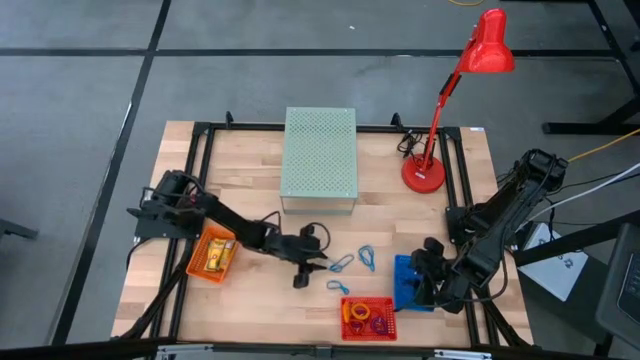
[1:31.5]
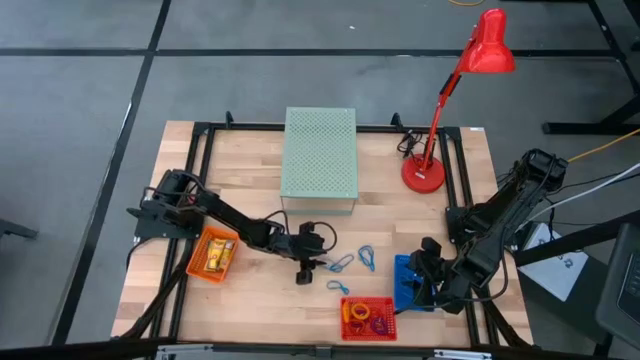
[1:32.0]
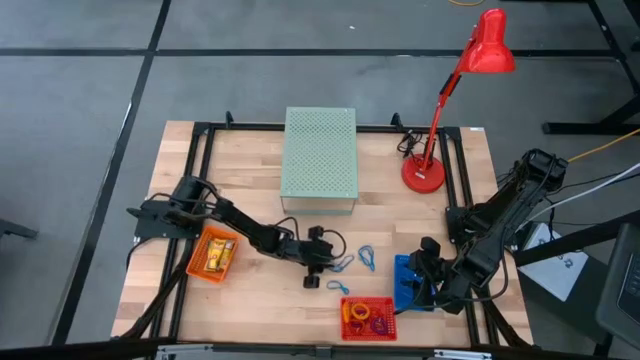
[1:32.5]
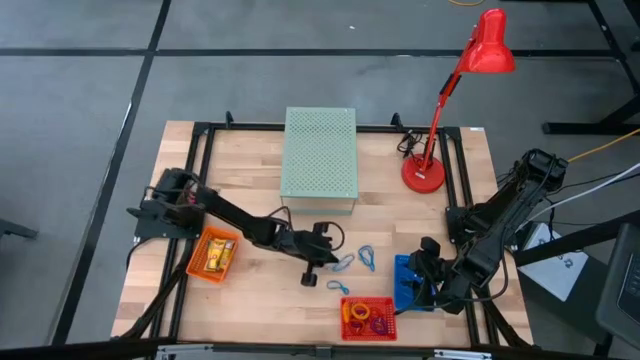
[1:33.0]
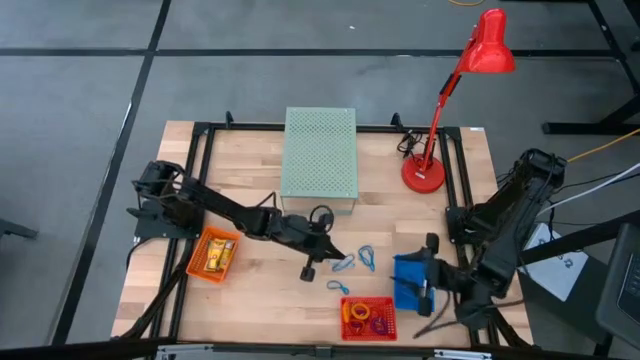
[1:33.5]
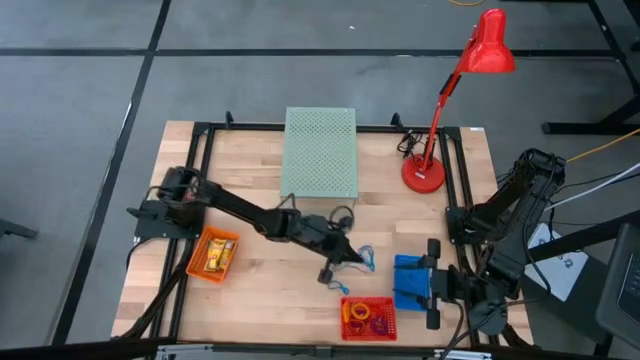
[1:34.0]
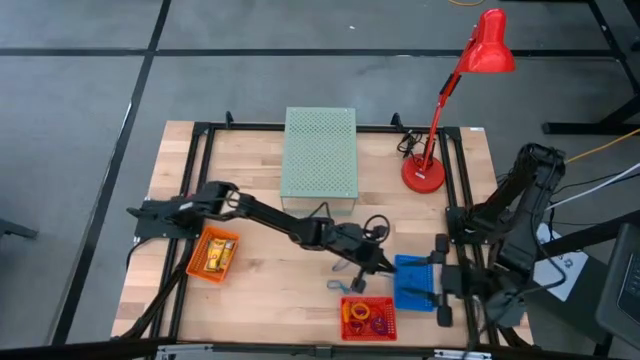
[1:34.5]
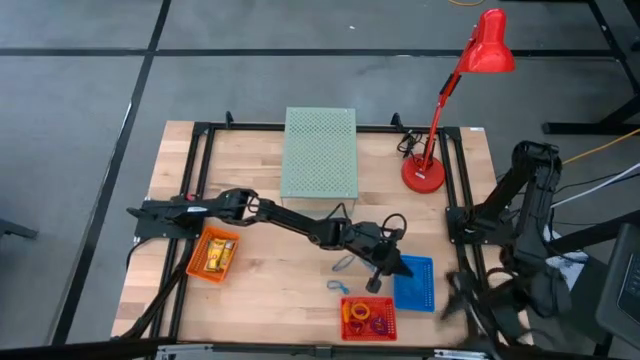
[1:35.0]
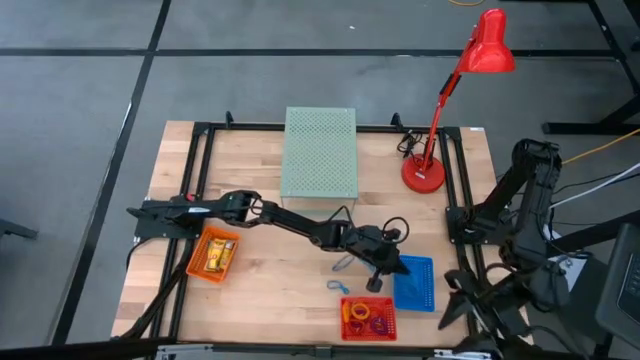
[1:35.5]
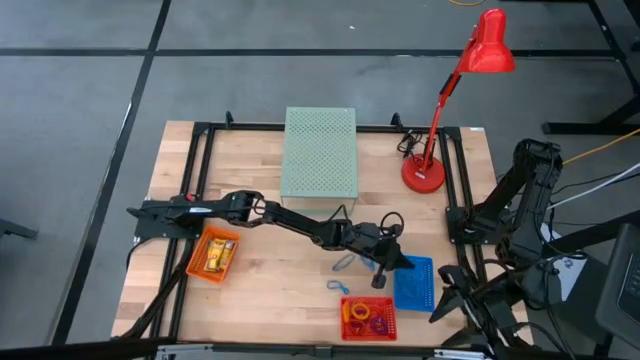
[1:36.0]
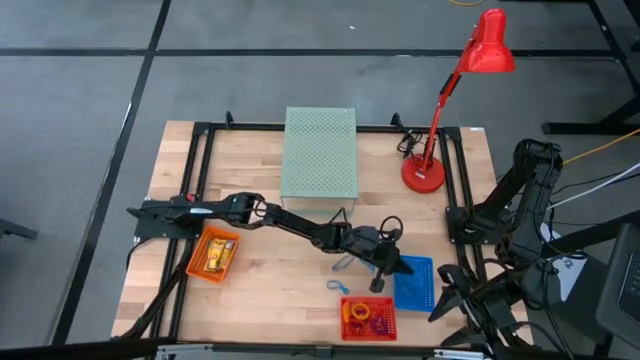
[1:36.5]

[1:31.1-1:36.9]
Task: Pick & Place Office Desk Supplies
Put the blue rubber band into the blue bin

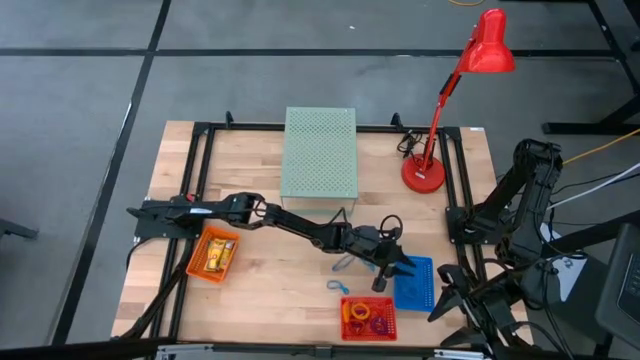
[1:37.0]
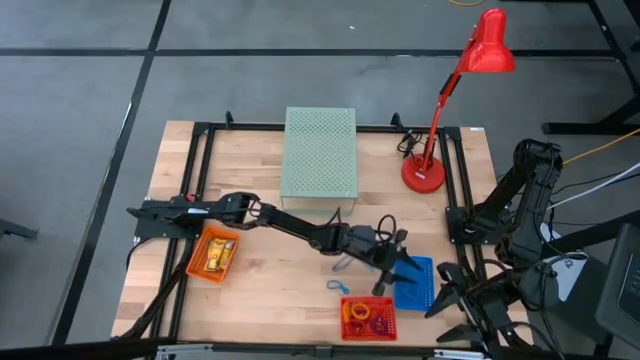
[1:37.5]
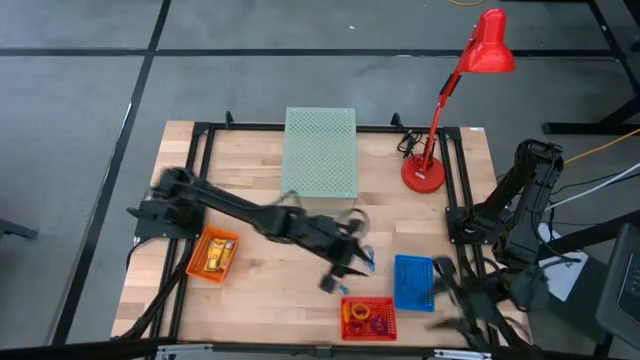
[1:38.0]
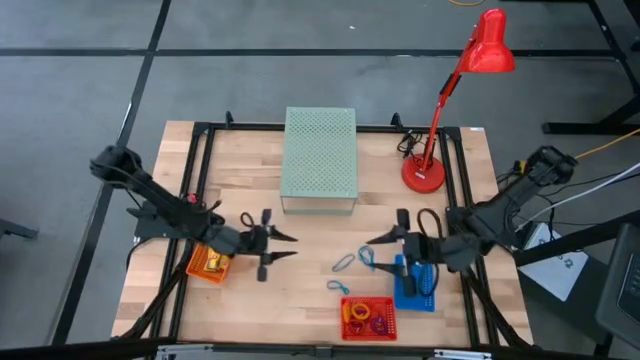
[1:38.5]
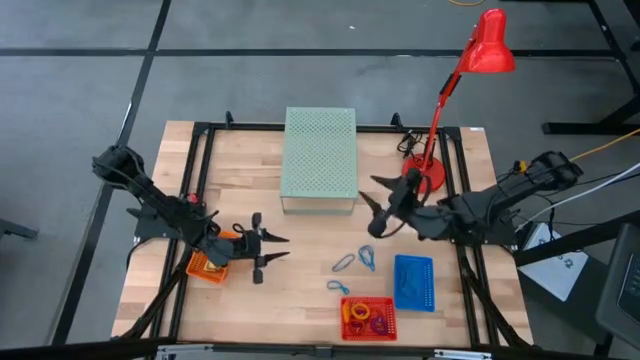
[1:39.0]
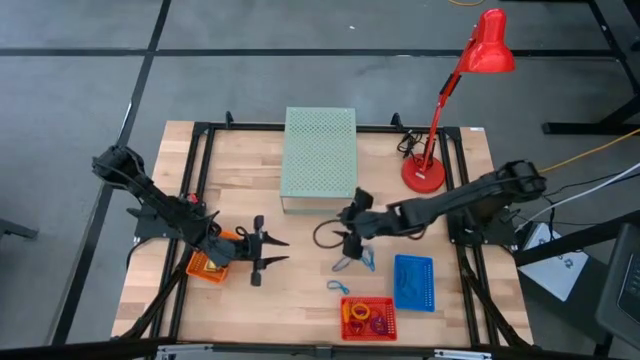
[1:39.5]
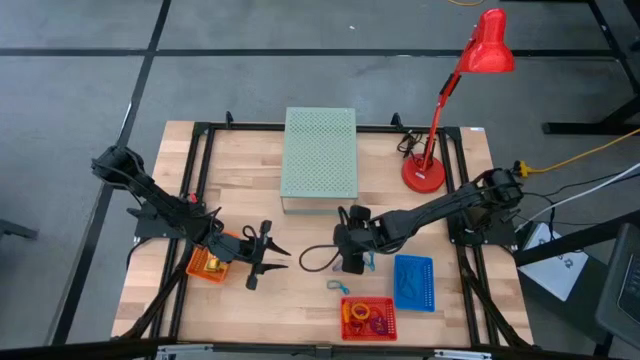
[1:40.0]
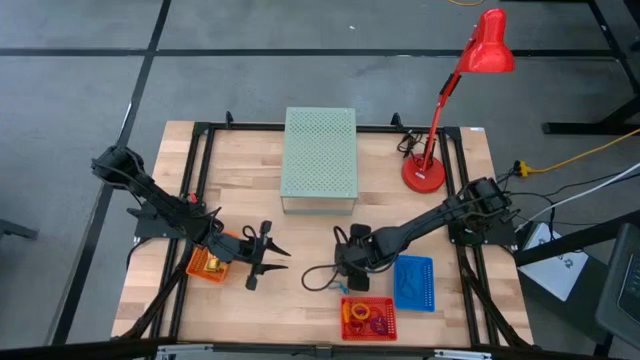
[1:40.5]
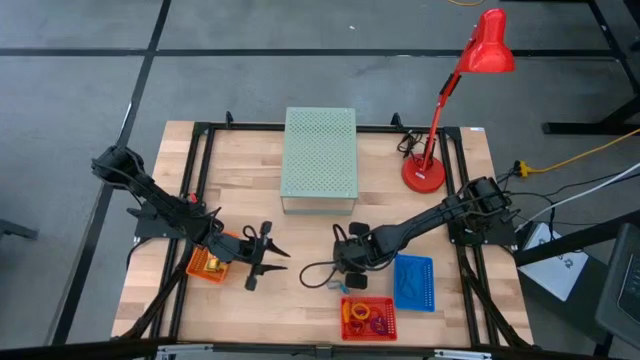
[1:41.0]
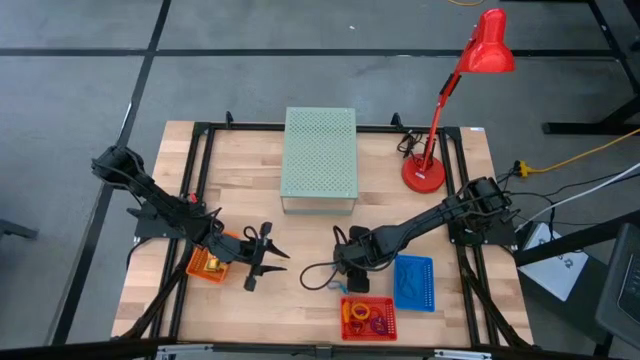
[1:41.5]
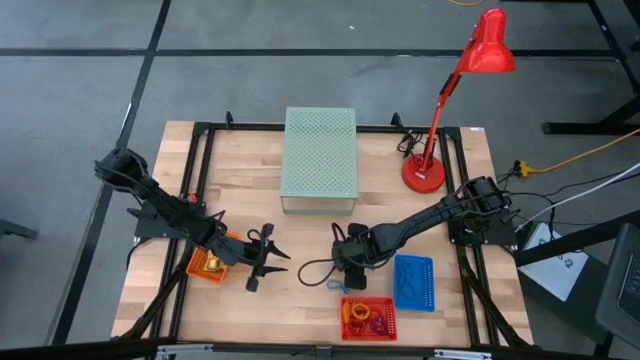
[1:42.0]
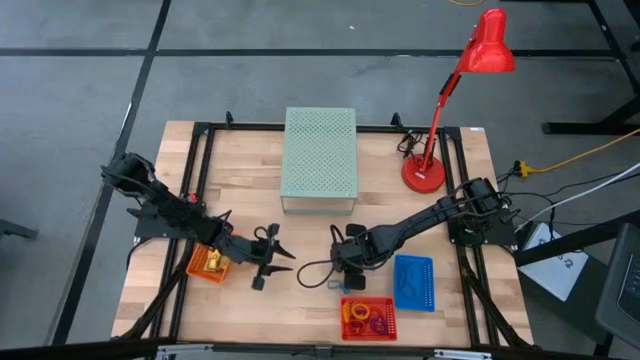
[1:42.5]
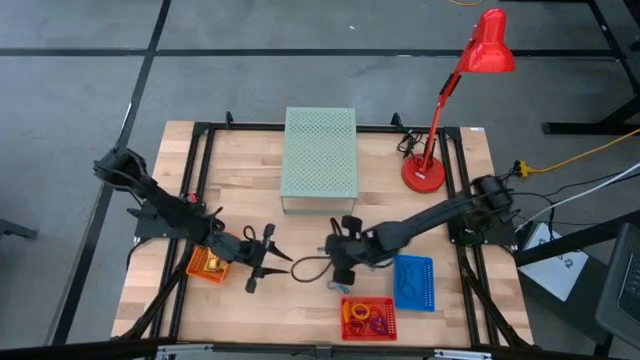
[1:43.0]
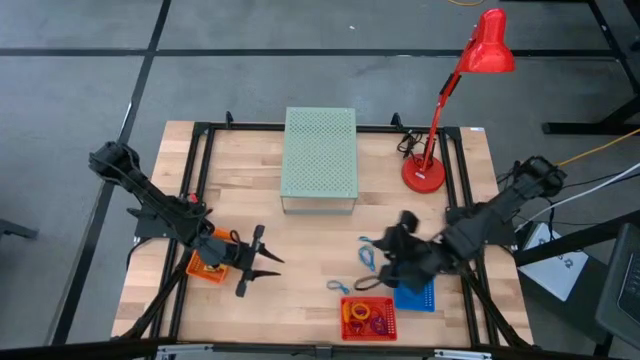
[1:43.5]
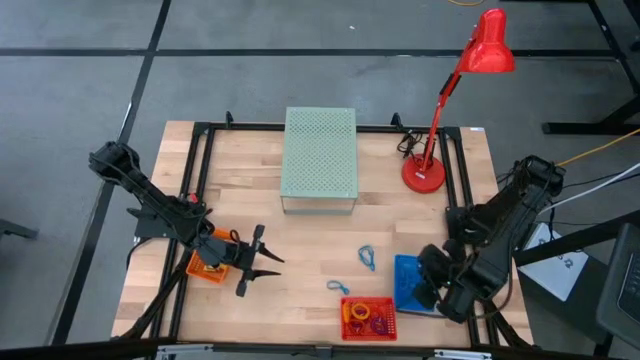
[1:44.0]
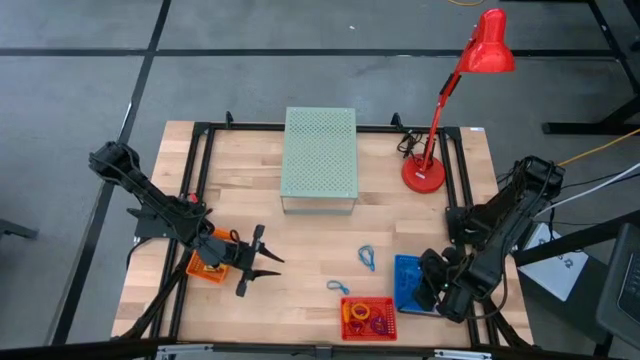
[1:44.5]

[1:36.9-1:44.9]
Put the blue rubber band into the blue bin

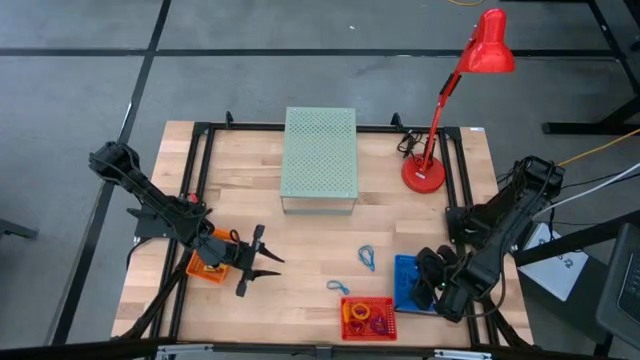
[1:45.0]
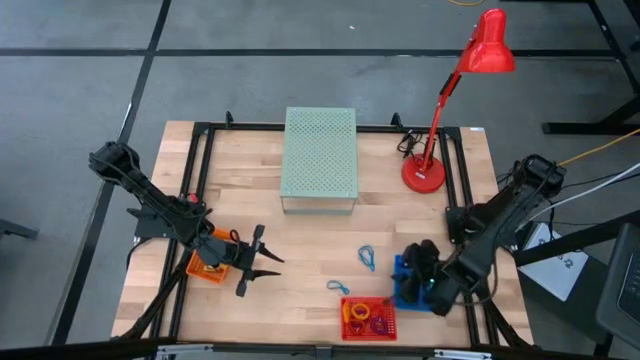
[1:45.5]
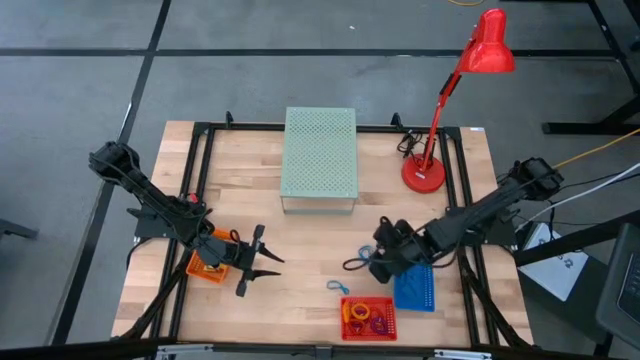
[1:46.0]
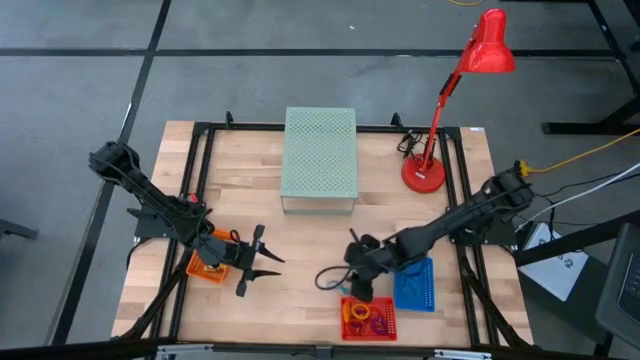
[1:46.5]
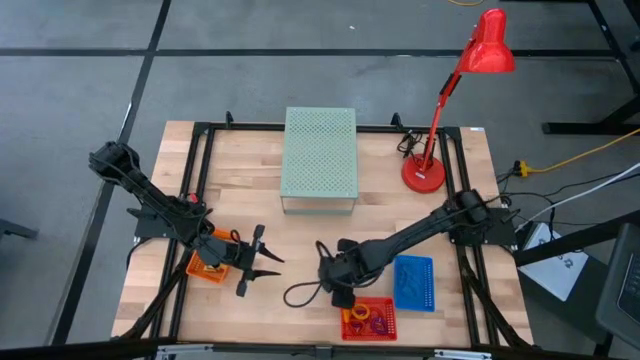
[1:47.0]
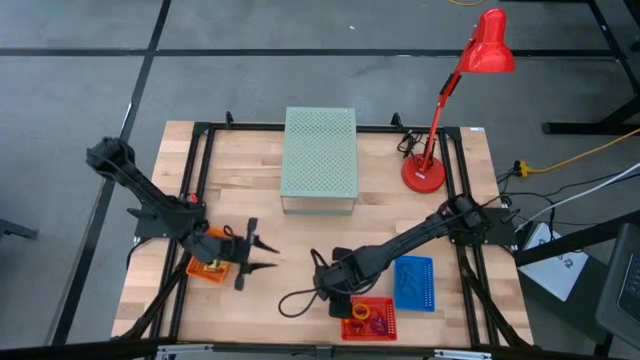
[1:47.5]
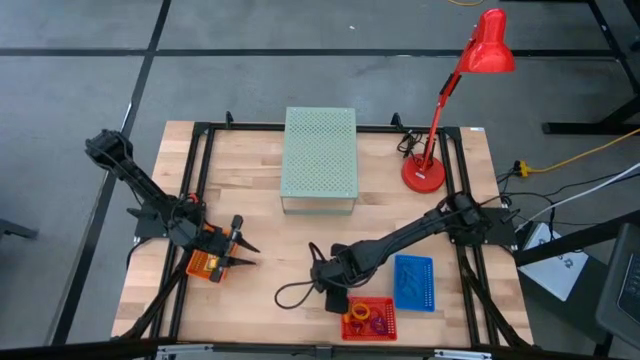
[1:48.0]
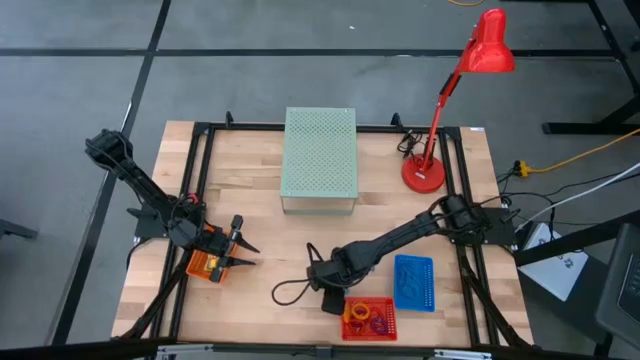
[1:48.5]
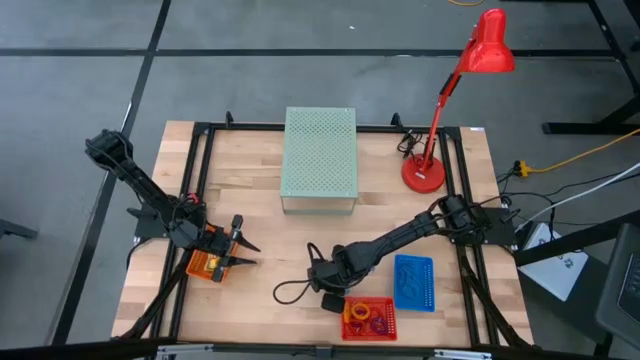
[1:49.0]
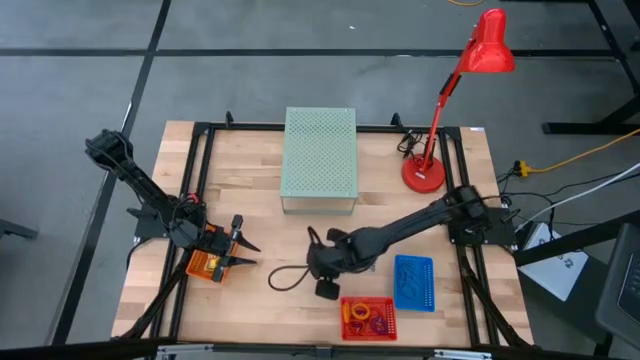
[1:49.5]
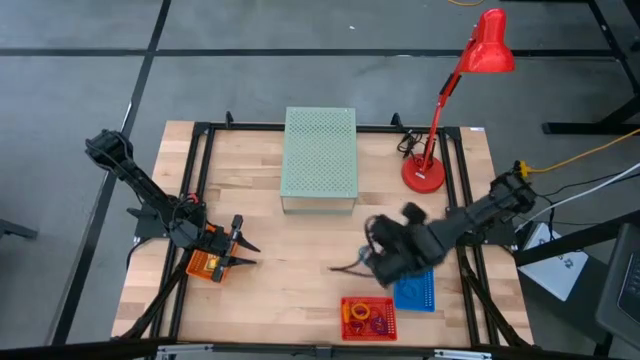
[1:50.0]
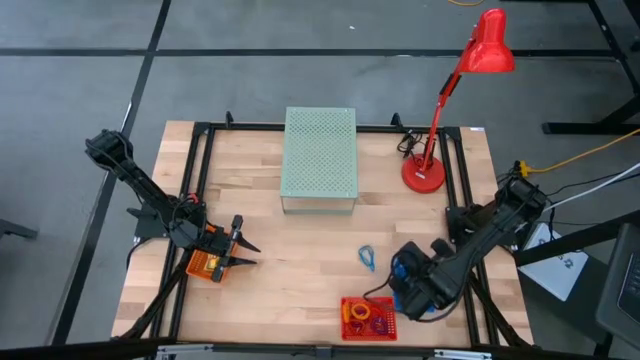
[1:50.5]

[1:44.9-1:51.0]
Put the blue rubber band into the blue bin

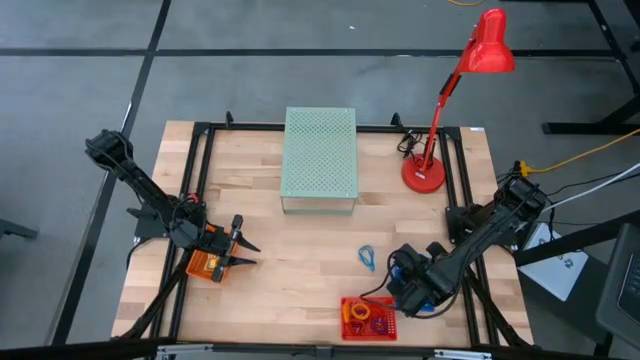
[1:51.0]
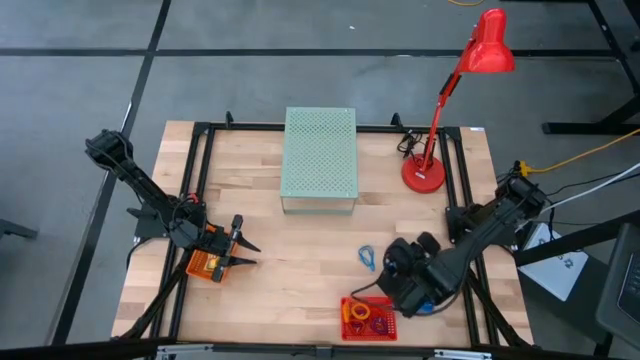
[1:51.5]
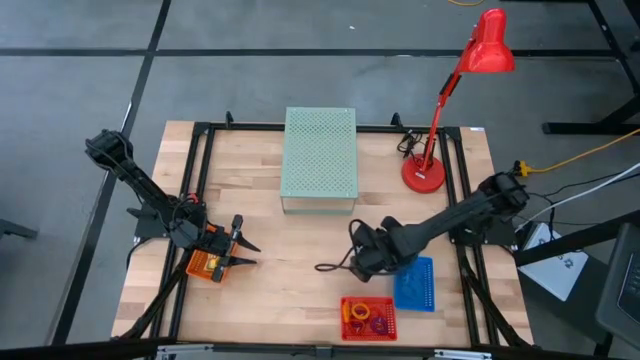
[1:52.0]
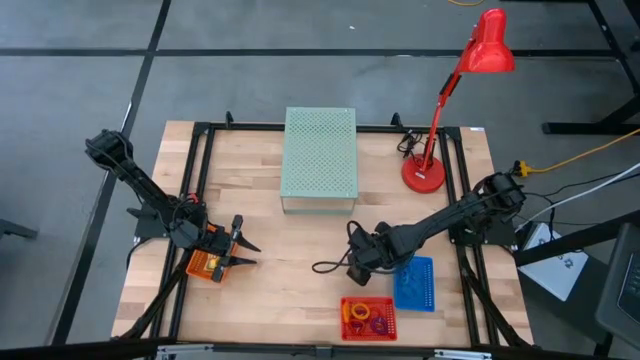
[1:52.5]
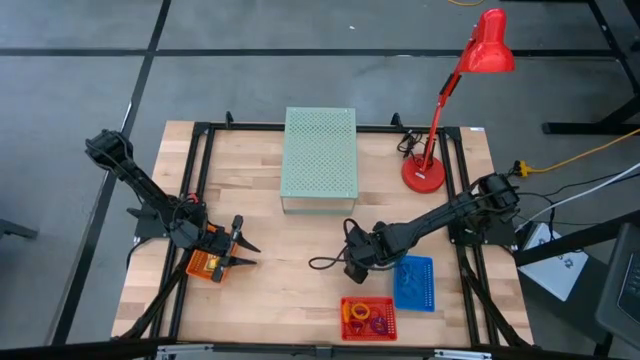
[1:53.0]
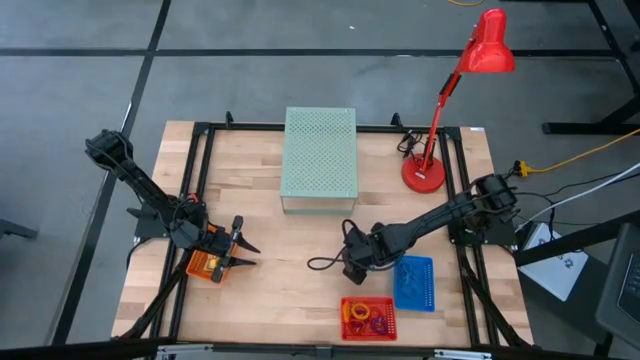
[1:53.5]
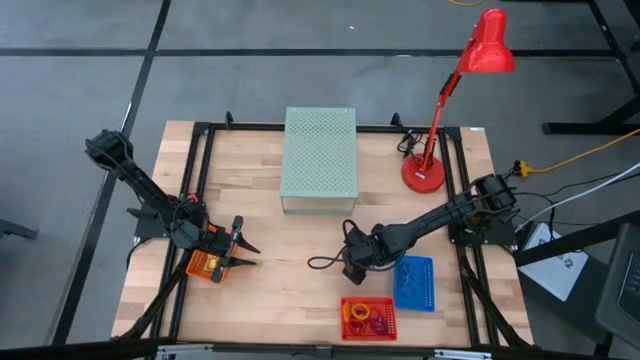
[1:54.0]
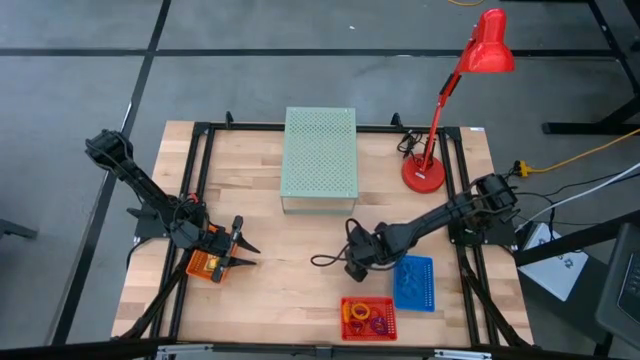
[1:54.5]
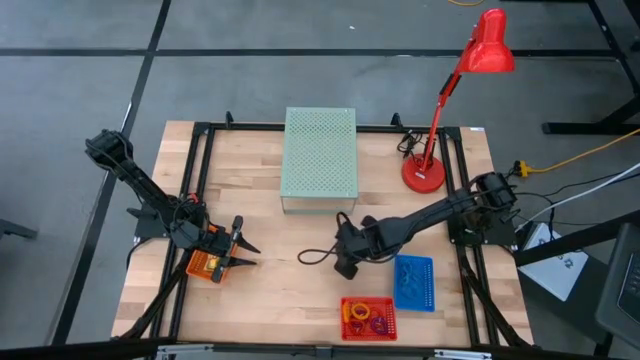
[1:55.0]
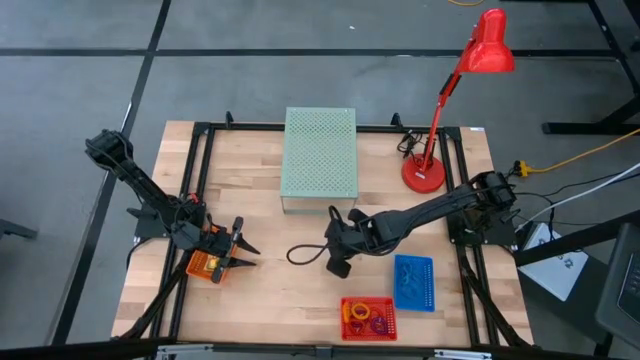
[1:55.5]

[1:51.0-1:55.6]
Put the blue rubber band into the blue bin
